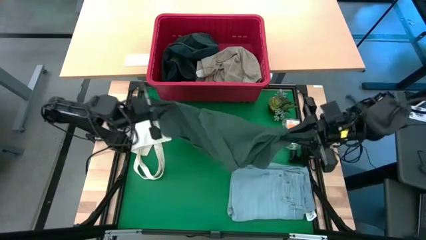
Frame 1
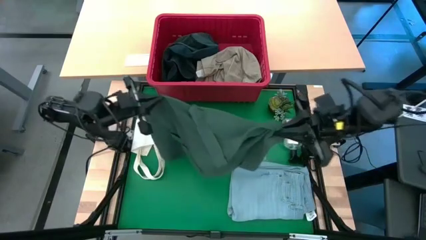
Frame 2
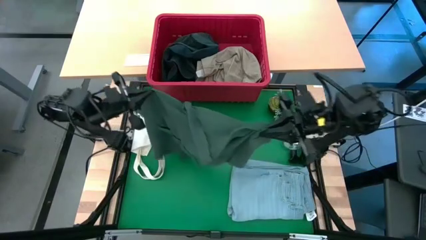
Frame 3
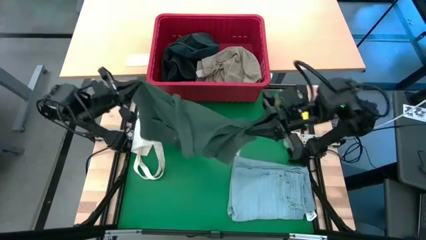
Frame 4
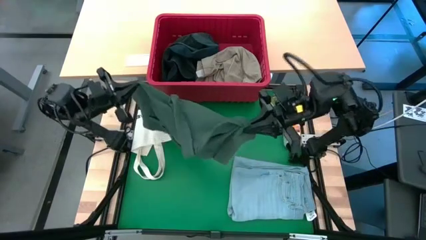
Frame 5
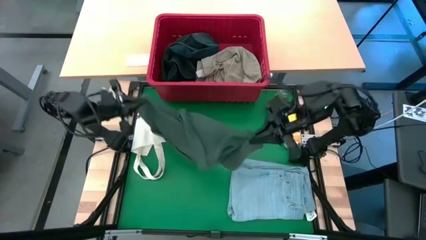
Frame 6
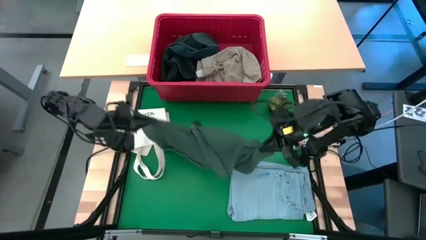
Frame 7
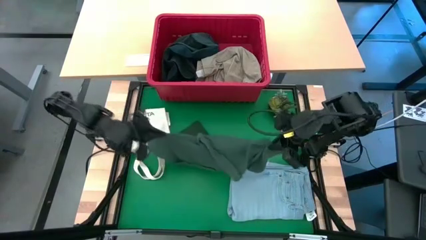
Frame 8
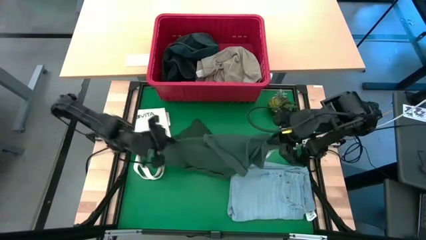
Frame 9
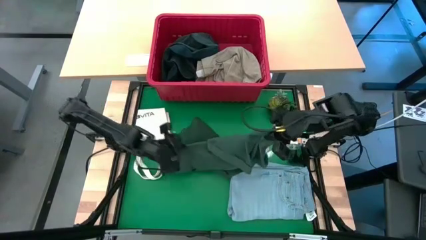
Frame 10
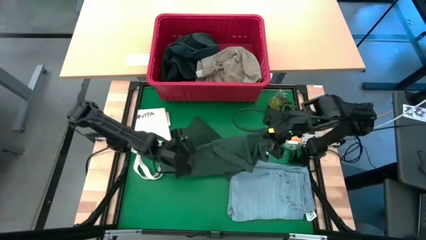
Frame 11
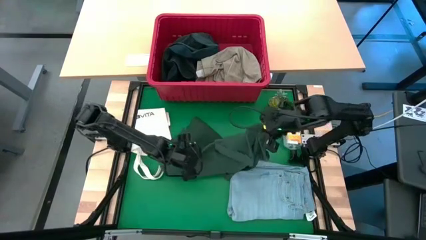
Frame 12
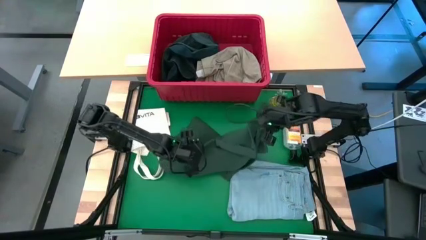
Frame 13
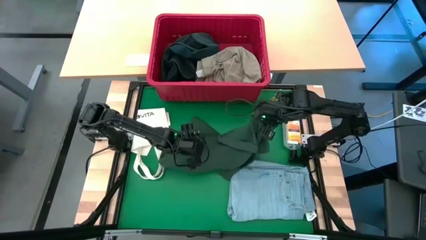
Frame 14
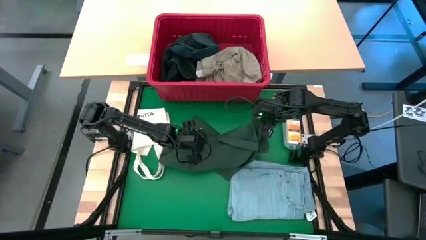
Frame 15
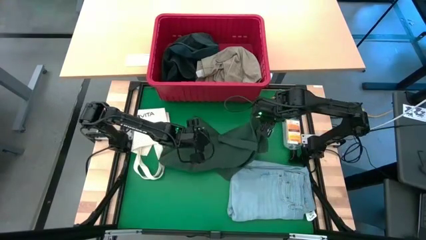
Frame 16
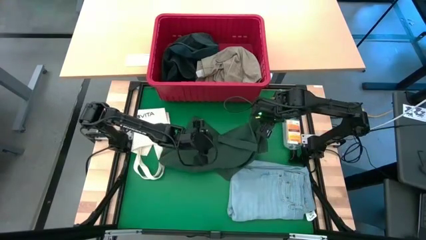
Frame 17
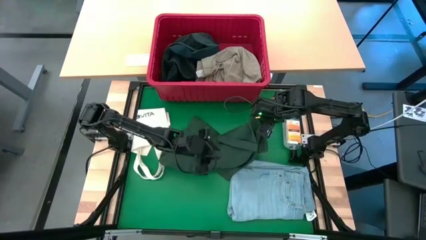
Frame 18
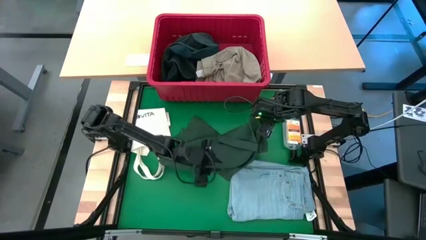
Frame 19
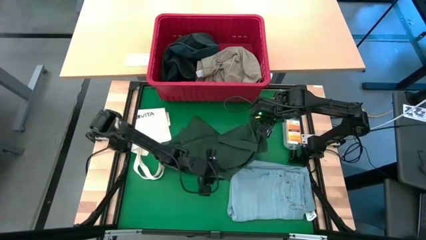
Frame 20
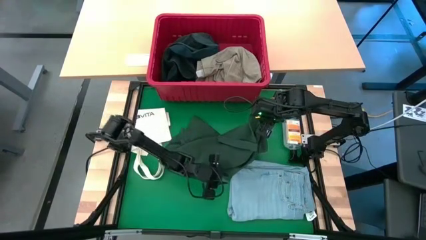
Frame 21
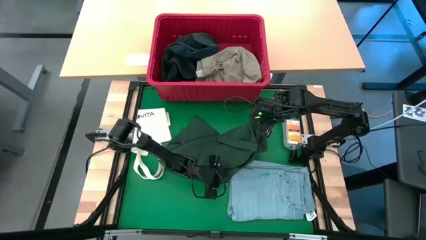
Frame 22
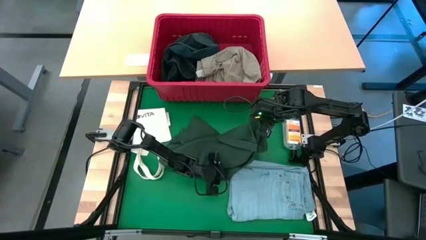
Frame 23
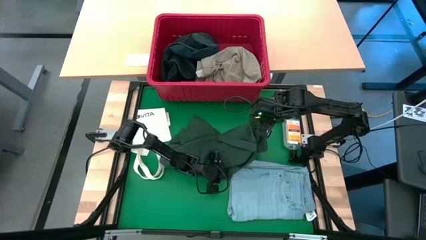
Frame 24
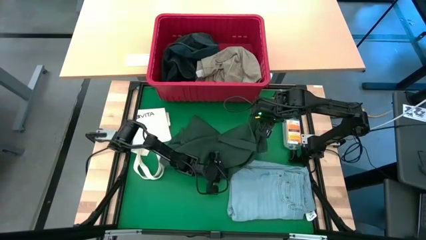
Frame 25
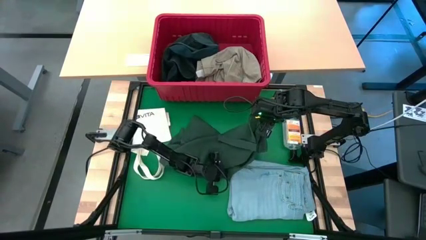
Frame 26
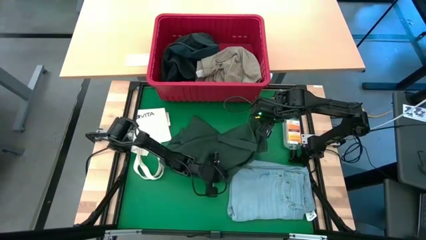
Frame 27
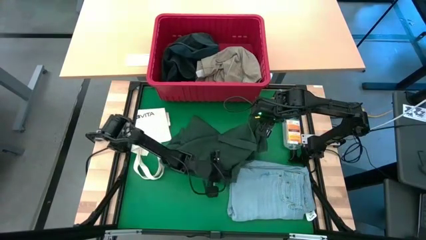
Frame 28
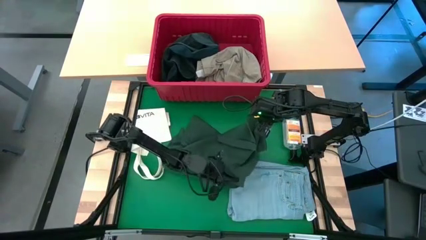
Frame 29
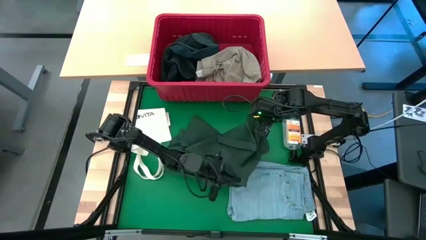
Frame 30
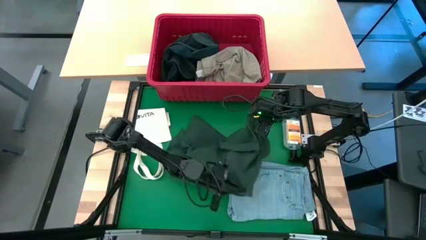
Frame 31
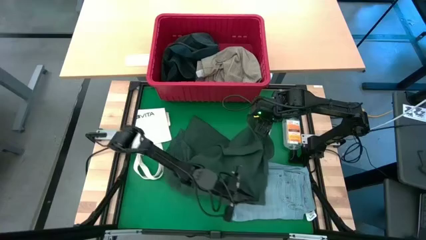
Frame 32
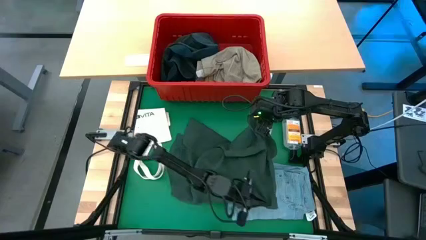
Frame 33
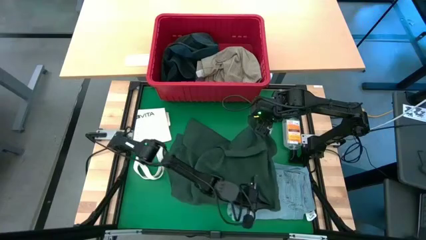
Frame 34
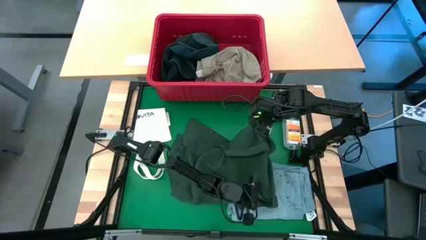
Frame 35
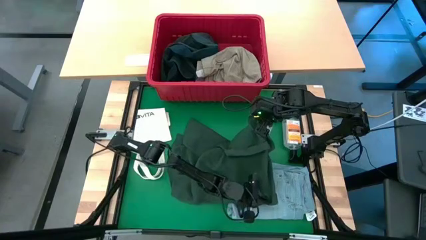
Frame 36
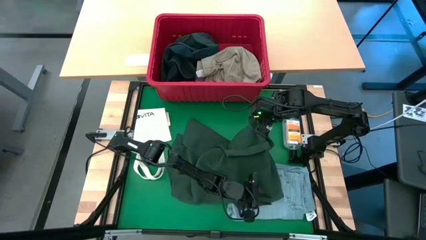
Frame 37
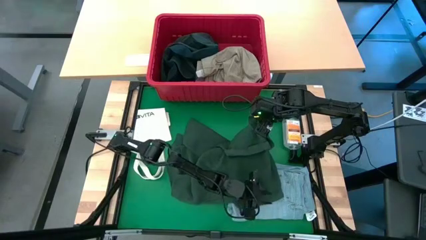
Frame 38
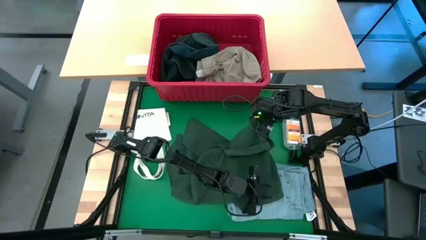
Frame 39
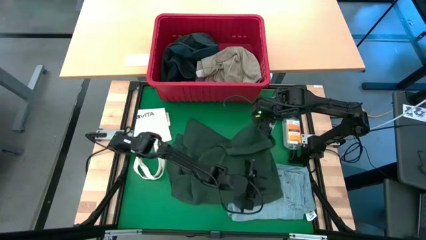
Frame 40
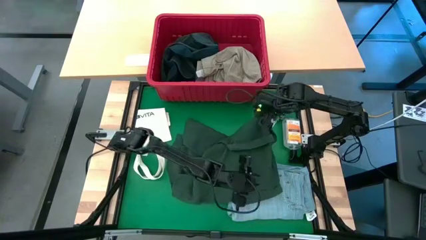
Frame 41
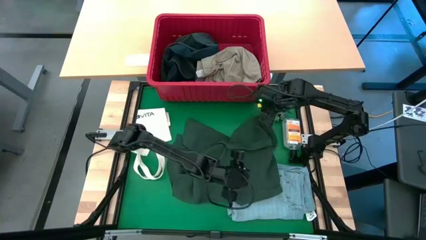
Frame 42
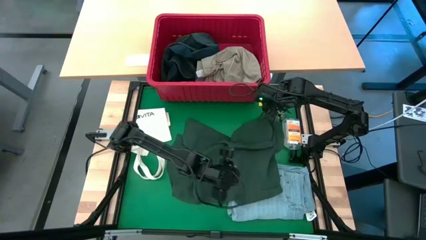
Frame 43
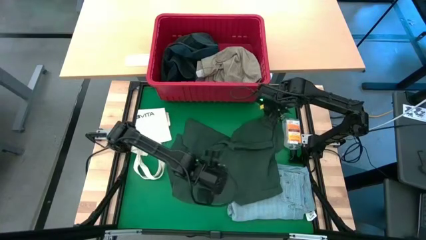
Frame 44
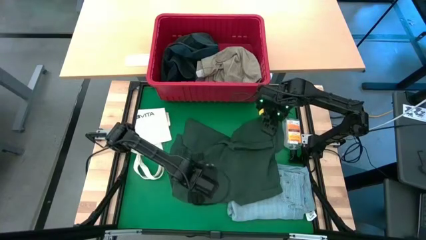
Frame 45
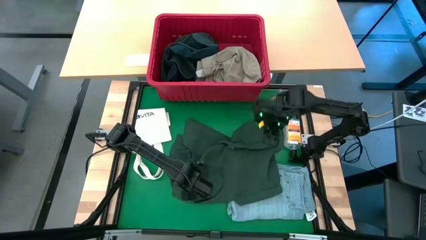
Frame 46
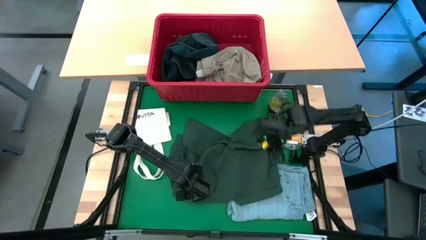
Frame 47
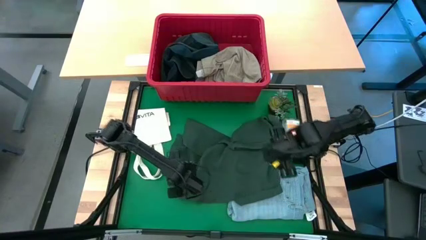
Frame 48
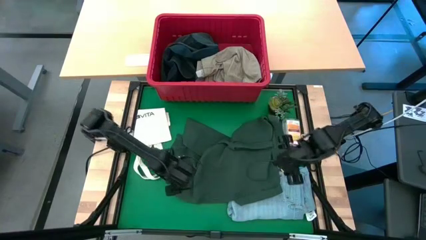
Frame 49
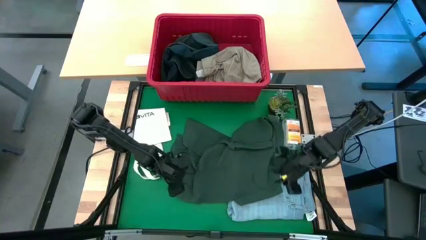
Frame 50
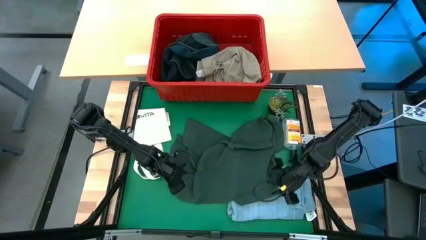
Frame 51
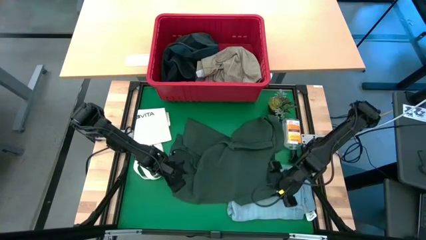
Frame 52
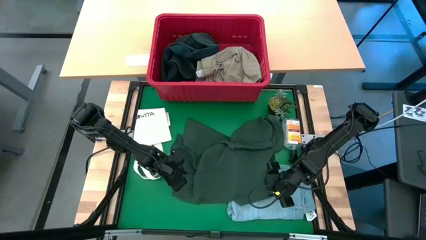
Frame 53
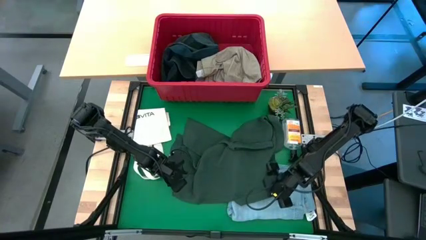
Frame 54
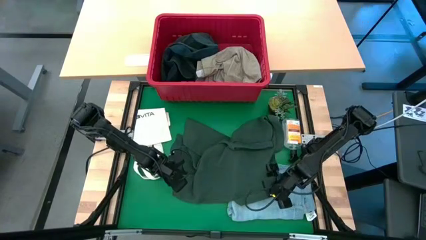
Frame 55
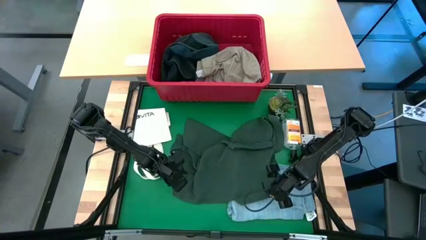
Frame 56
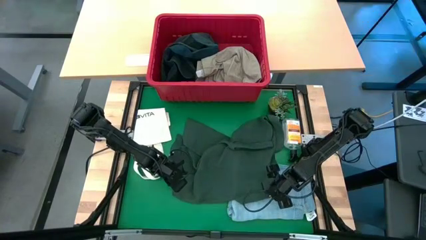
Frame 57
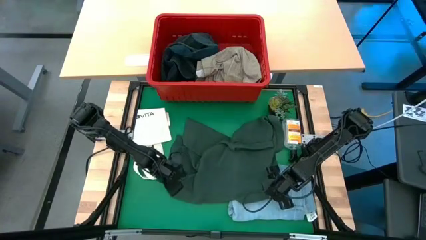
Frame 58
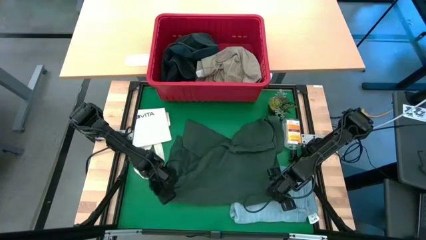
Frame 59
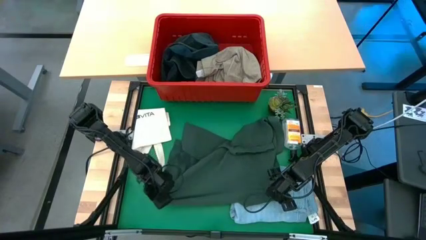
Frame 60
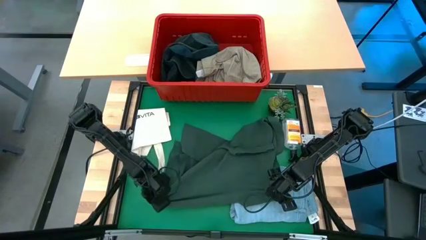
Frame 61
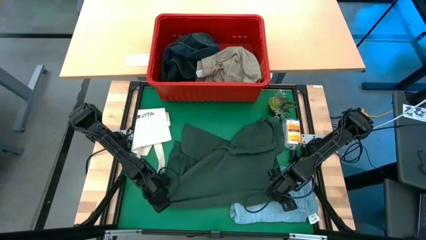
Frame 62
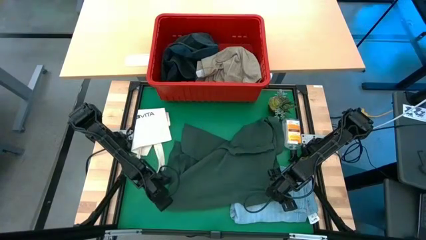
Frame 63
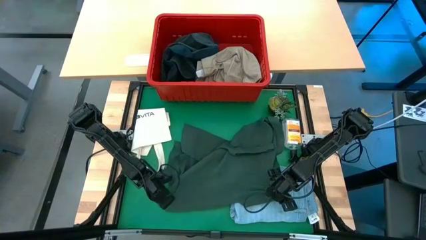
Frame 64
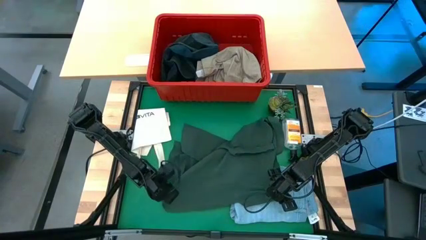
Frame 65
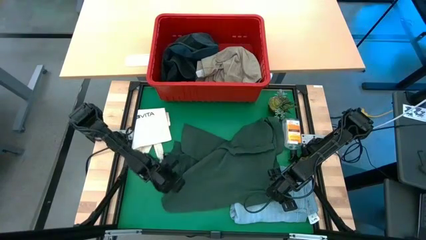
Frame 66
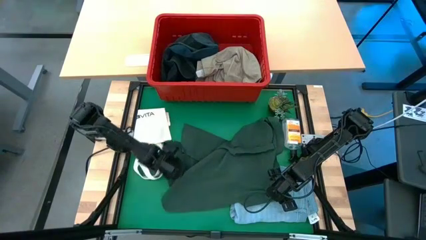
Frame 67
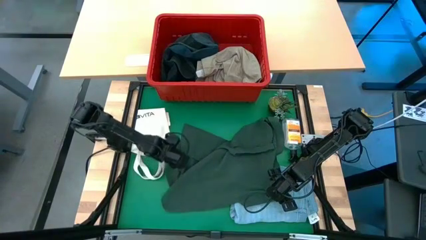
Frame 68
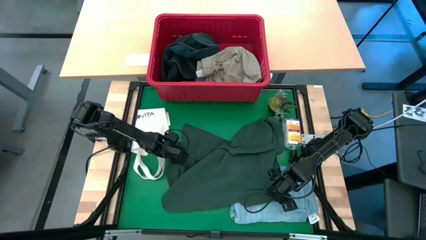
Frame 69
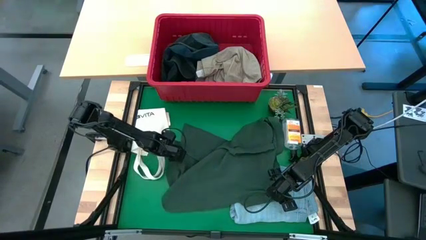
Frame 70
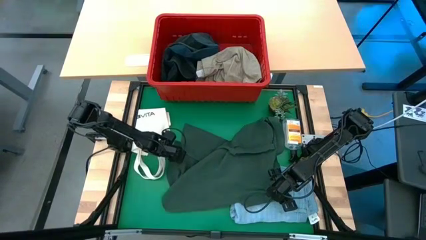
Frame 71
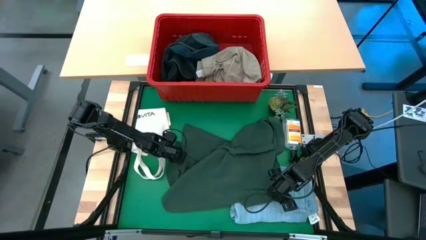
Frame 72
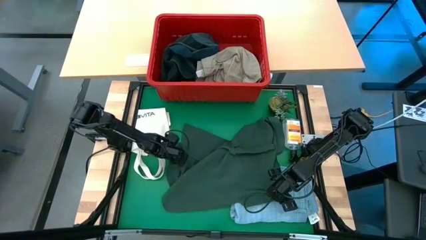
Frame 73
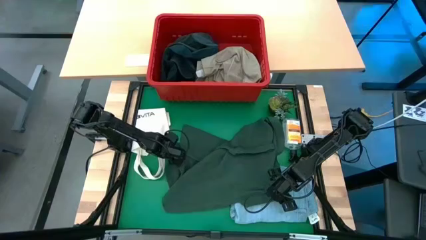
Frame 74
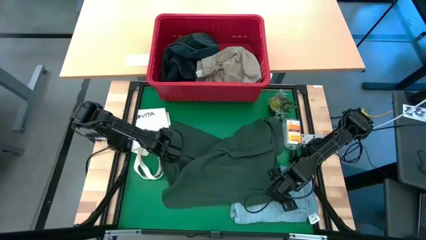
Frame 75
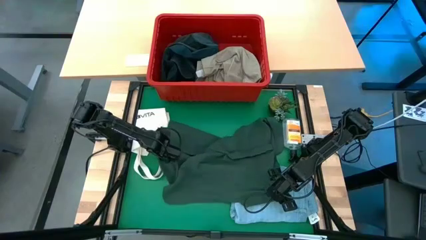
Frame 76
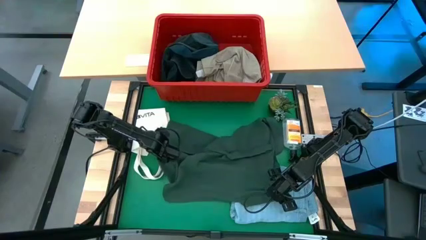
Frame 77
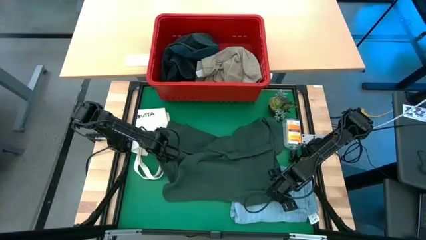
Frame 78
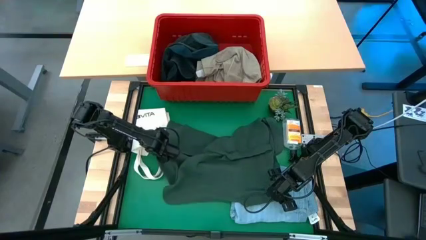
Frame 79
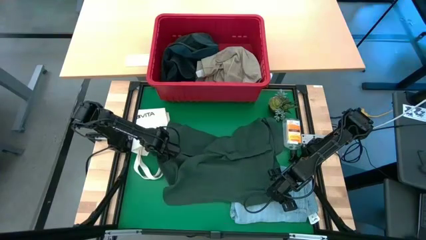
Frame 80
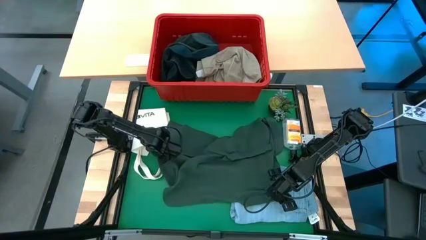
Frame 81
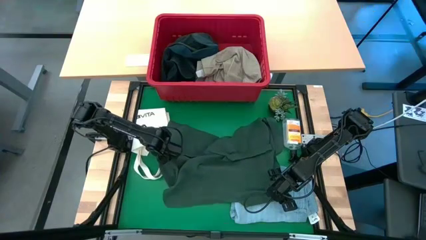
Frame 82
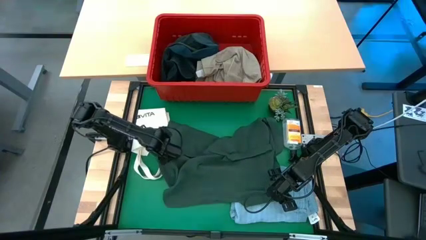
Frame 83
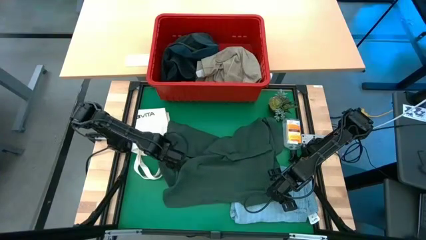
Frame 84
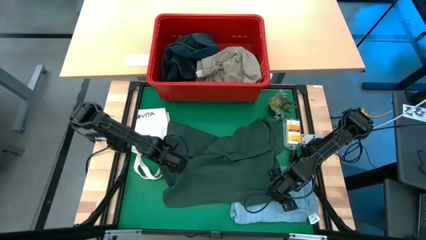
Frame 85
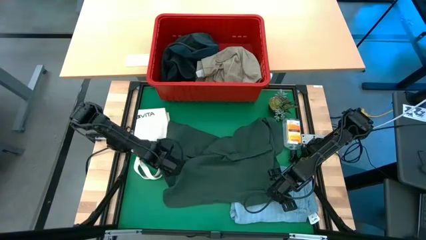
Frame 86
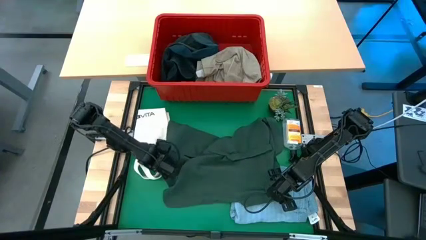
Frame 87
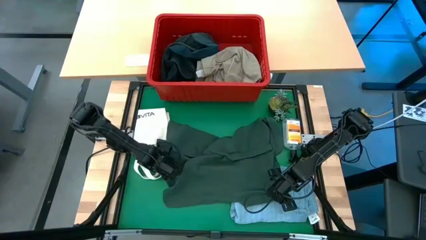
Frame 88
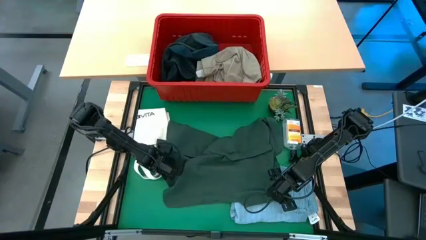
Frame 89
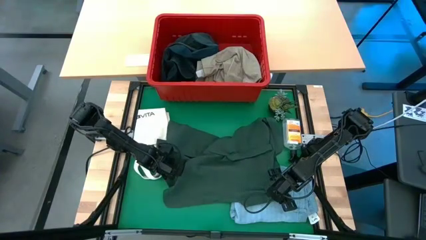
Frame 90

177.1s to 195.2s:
Task: Fold Laundry from Bin
Fold the green shirt
